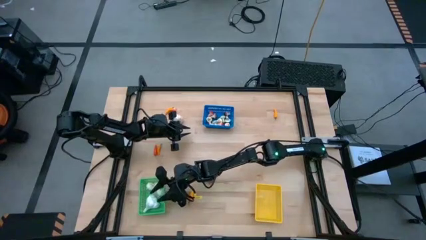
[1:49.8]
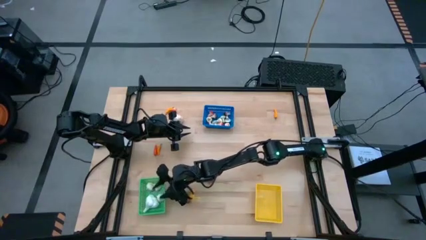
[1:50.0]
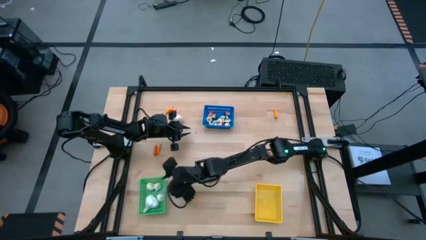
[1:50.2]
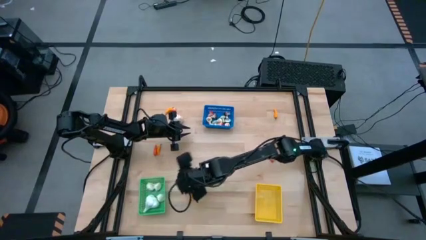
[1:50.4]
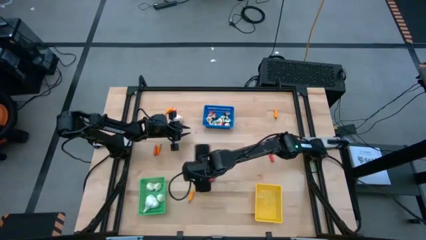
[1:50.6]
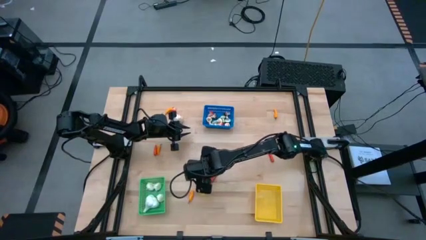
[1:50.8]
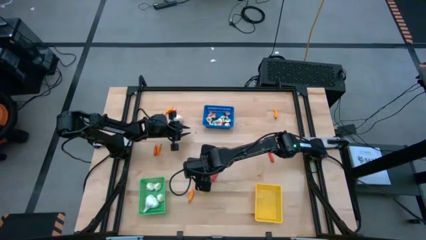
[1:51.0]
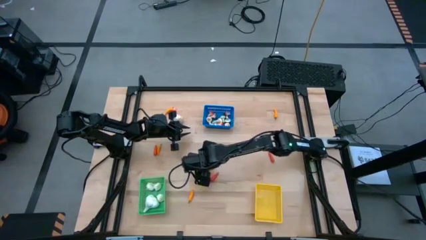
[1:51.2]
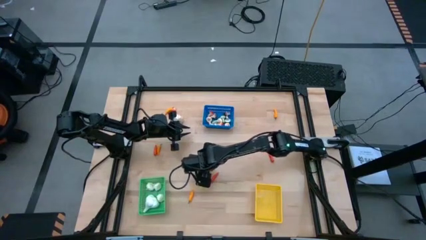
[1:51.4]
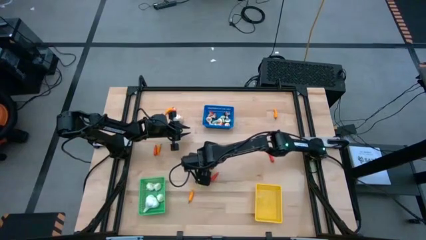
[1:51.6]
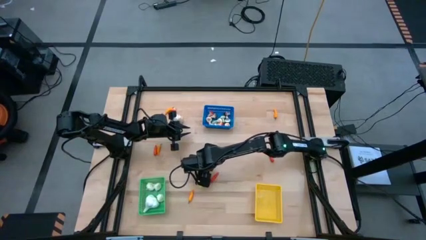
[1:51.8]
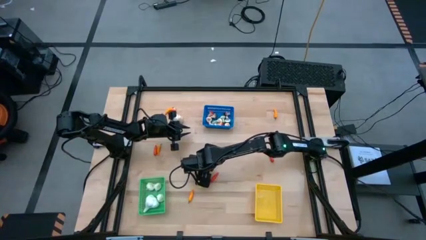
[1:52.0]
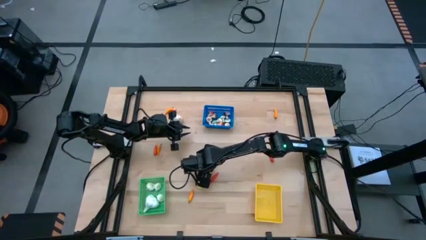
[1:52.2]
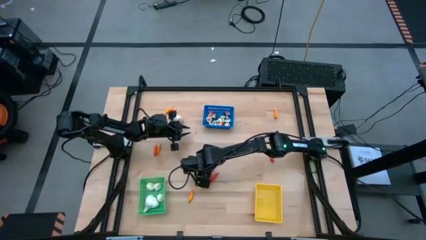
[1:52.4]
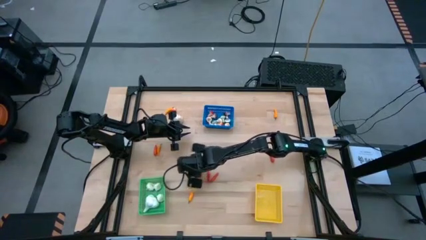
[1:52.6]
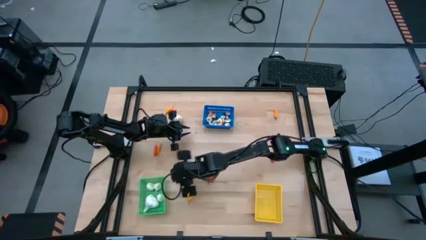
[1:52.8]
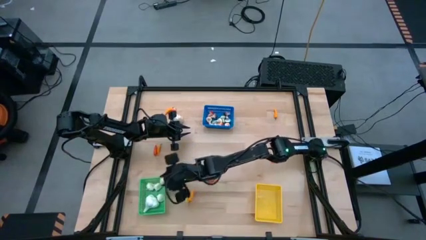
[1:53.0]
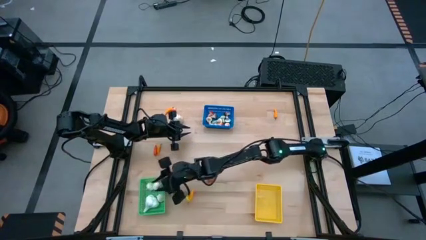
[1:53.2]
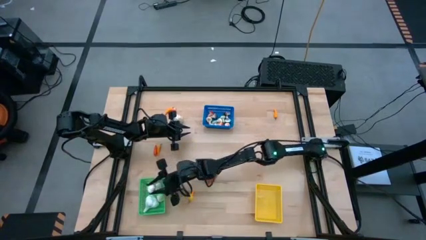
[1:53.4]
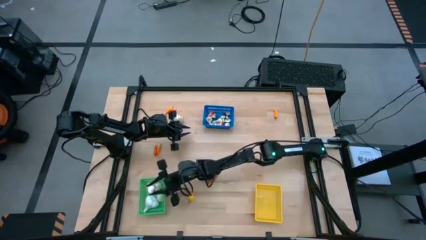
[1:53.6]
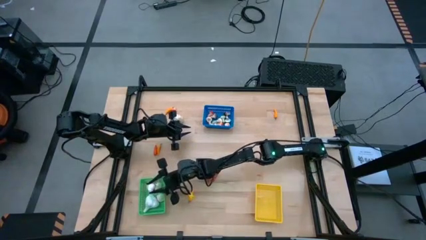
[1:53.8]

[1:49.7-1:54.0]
Task: Sort produce into baskets
Put the white garlic into the green bin

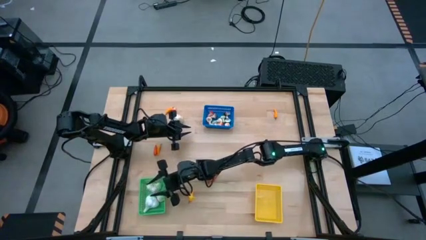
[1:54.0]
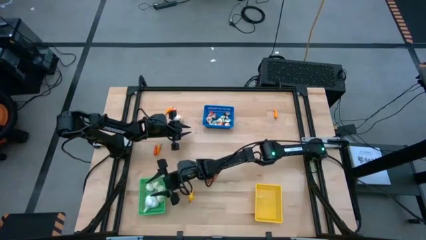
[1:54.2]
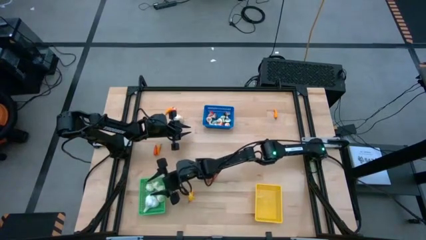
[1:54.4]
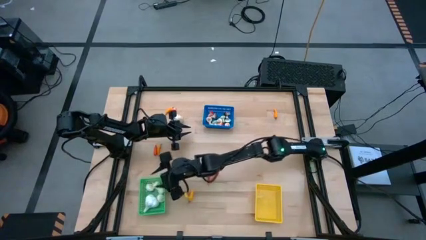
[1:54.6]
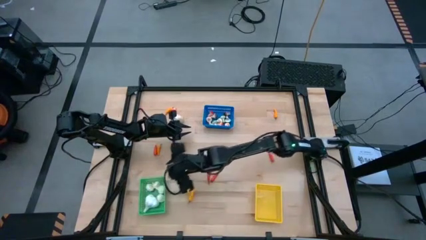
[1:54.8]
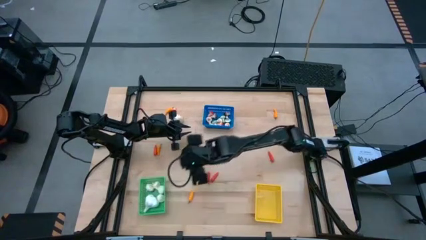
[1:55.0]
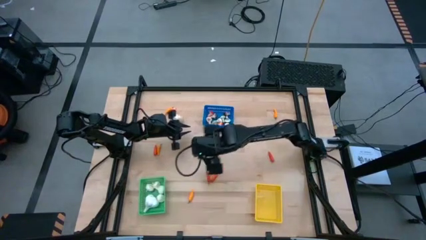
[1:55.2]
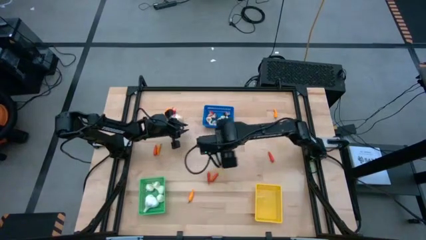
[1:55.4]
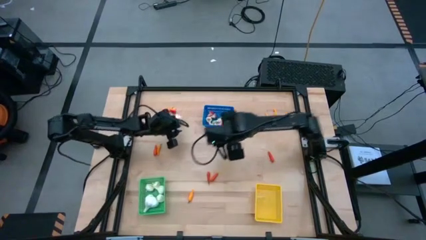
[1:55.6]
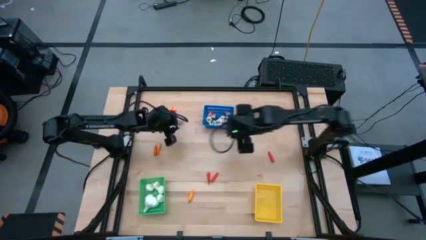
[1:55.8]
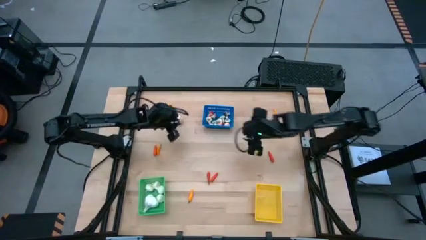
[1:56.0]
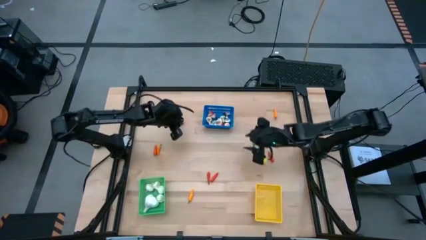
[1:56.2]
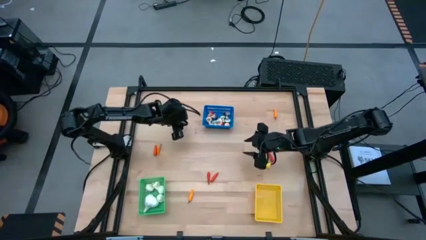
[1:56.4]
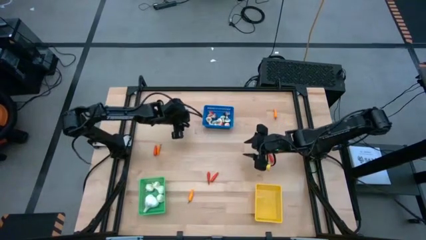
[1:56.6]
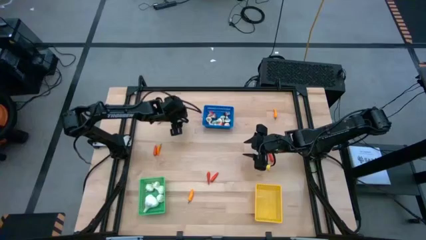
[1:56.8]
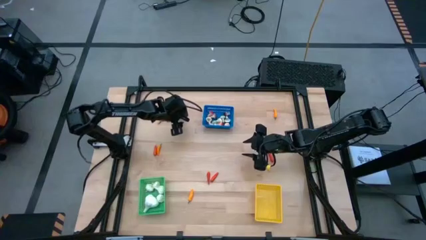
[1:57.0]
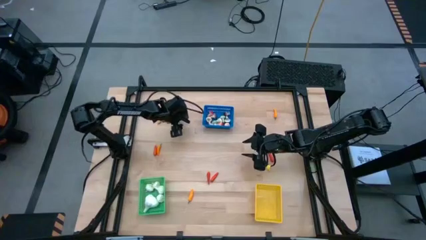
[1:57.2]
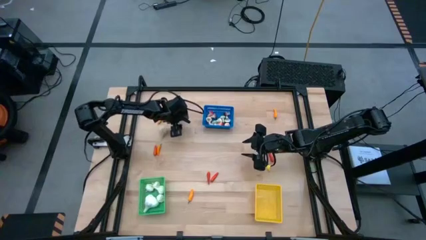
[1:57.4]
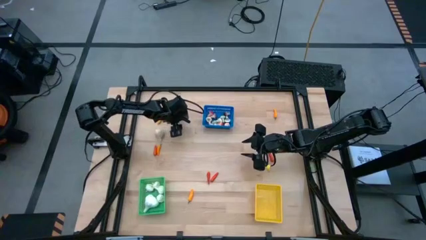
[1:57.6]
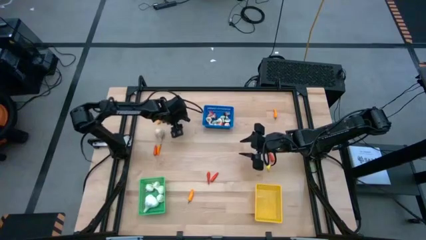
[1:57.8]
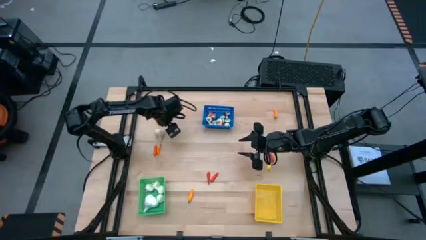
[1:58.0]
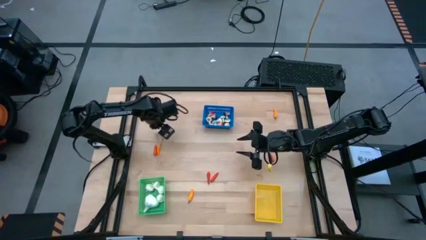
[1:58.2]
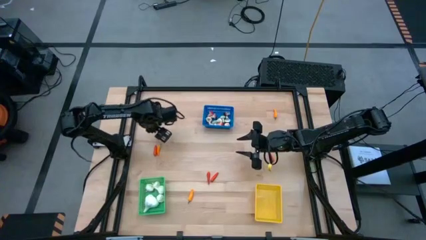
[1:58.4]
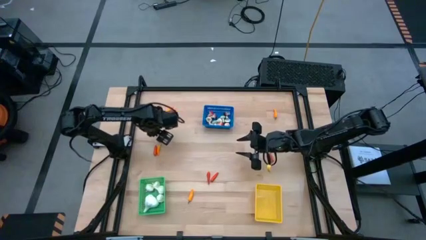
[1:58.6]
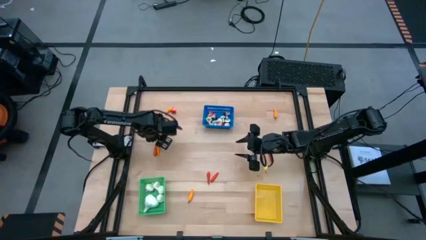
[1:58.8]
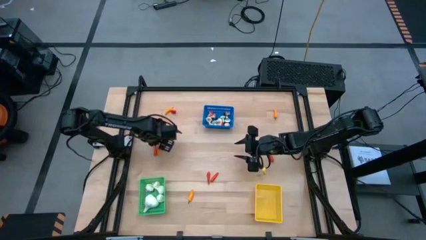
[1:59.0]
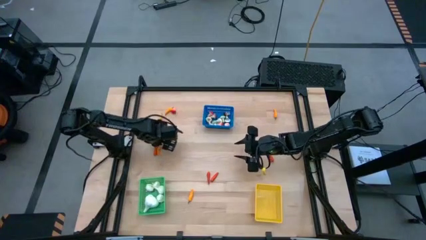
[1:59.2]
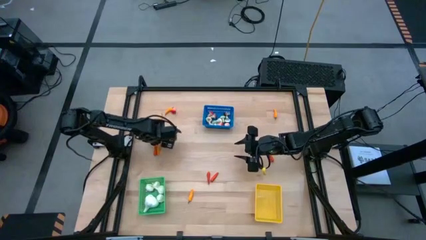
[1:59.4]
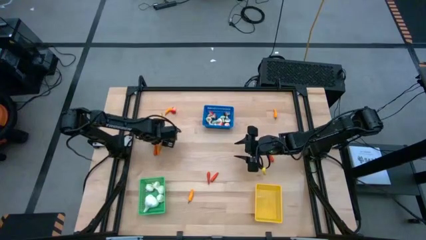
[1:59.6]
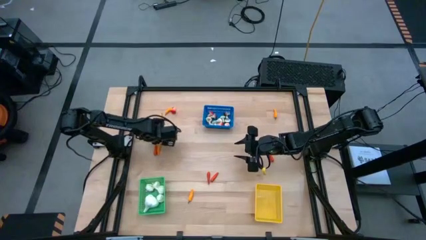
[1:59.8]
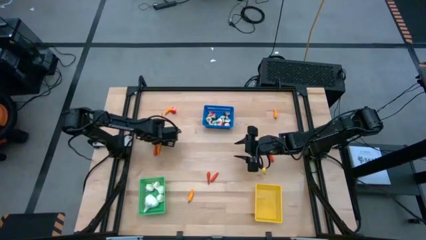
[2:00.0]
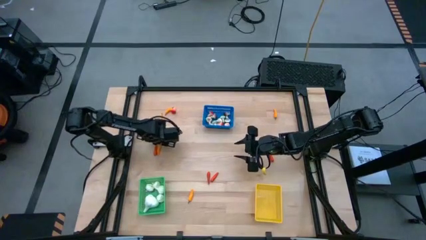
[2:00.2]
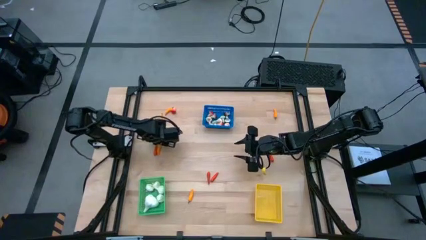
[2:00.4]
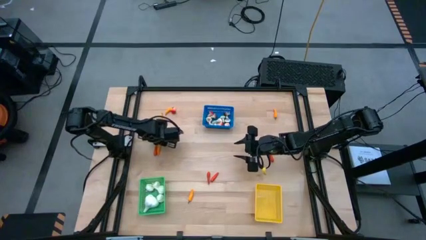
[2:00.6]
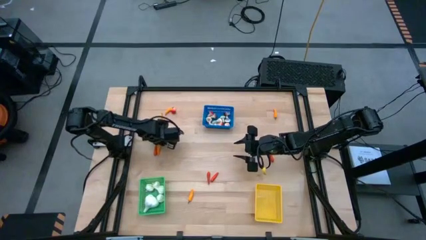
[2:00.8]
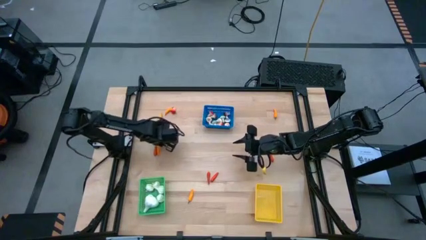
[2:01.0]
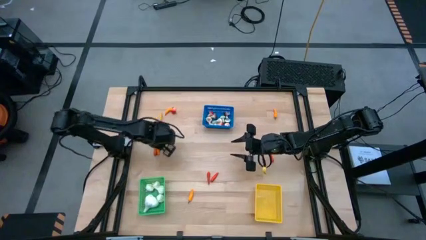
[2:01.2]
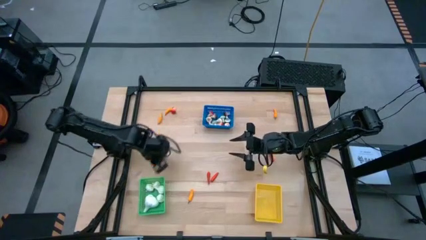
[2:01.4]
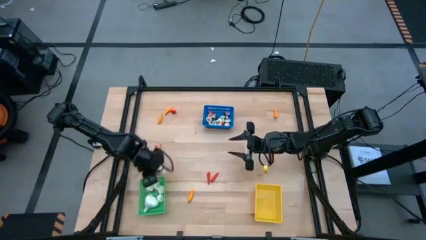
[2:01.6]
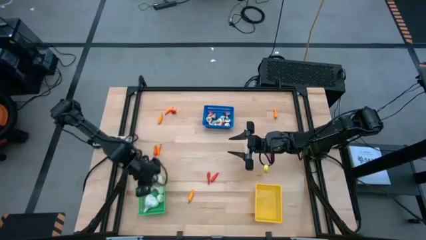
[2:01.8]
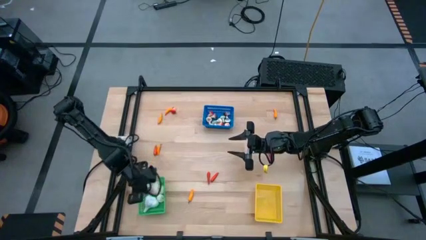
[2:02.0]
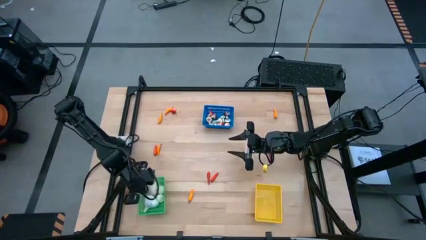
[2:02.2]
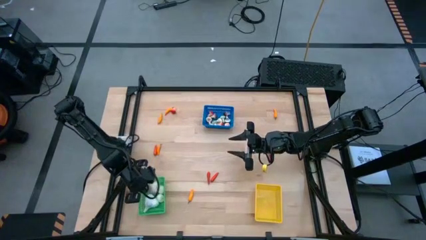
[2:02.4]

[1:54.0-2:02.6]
Put the white garlic into the green bin

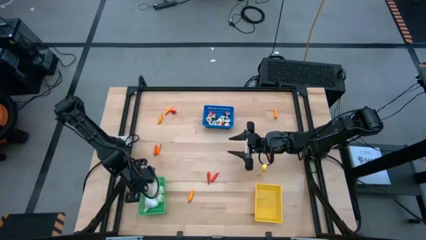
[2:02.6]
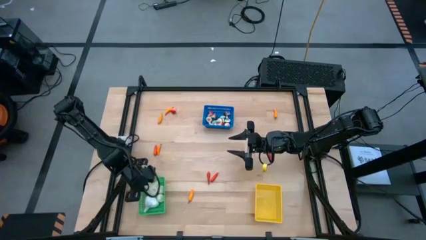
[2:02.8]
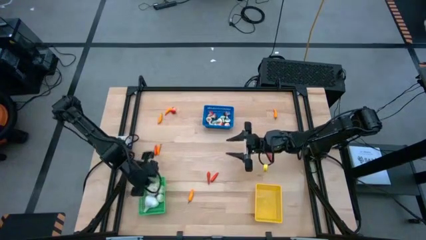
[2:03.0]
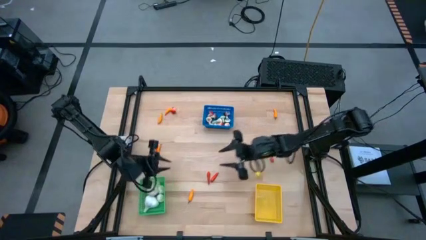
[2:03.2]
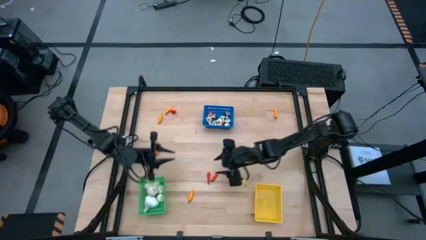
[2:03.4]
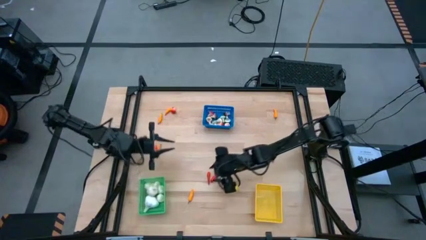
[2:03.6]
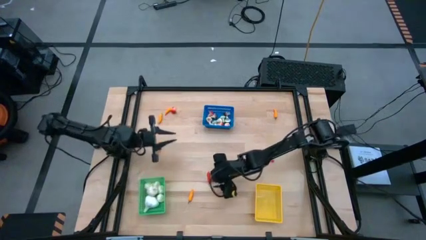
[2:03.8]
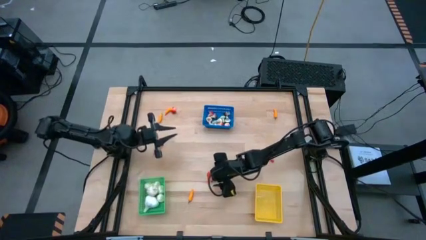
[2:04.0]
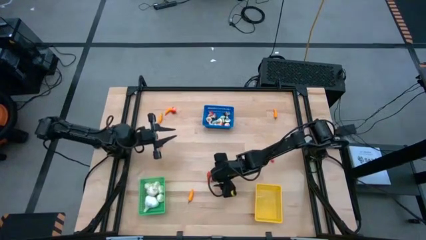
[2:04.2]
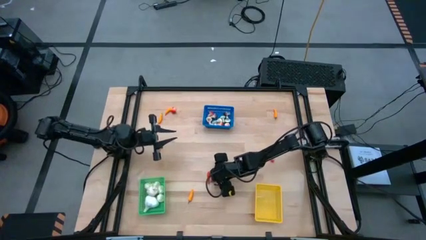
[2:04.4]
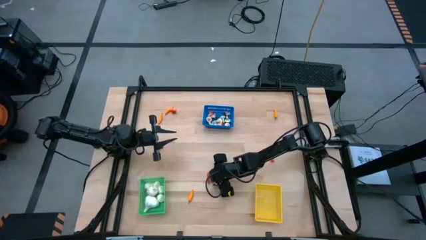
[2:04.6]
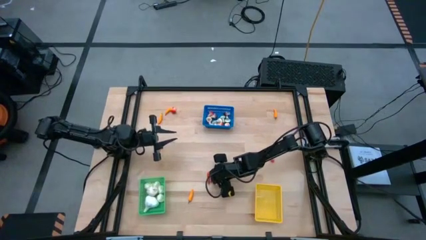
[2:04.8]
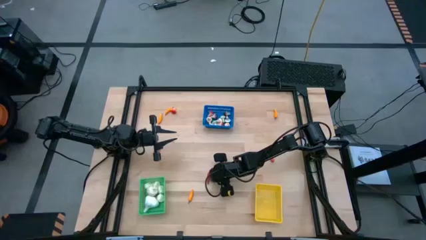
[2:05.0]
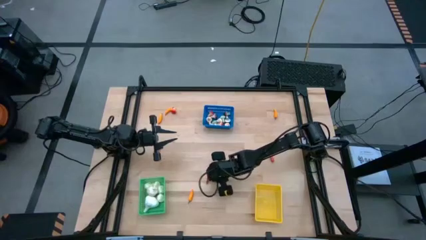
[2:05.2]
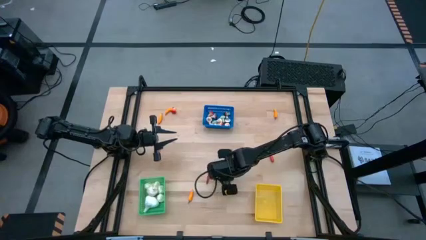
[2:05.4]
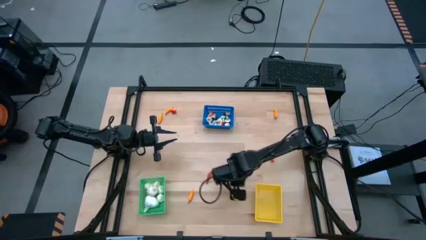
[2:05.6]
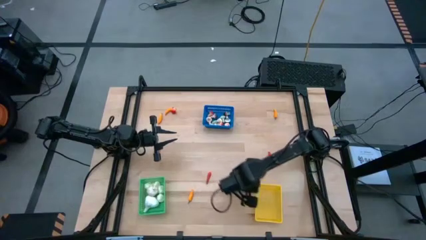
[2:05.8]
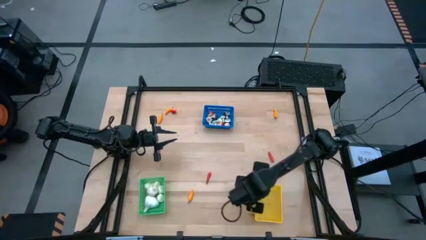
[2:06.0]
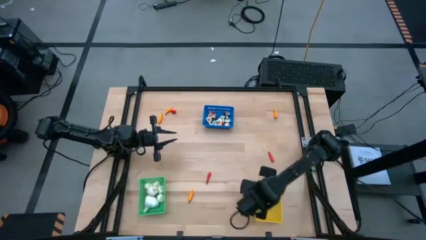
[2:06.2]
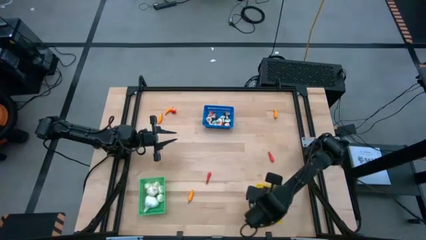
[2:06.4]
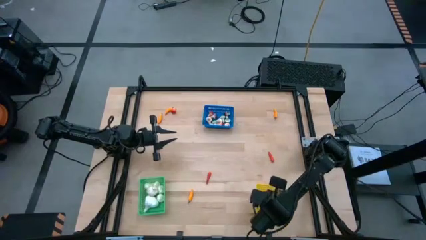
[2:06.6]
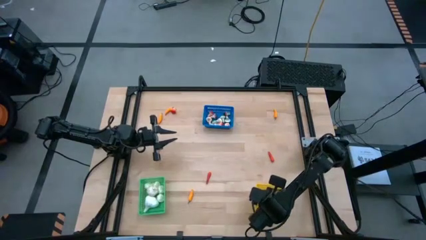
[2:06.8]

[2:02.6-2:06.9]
Put the orange chili pepper into the yellow bin
